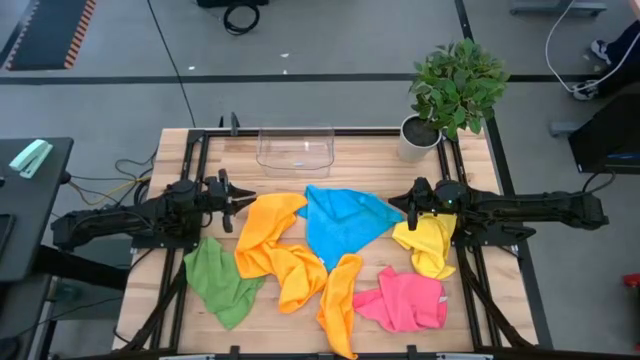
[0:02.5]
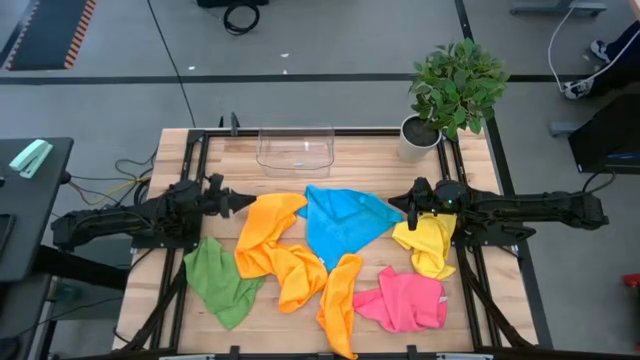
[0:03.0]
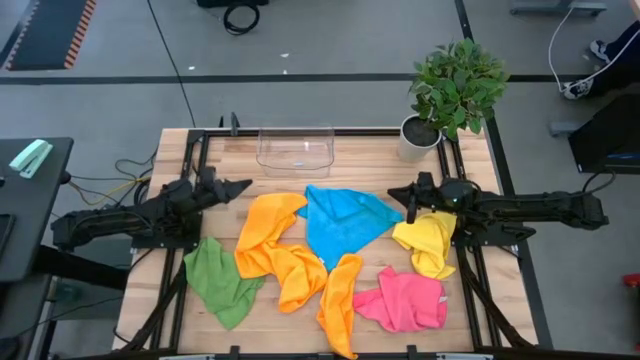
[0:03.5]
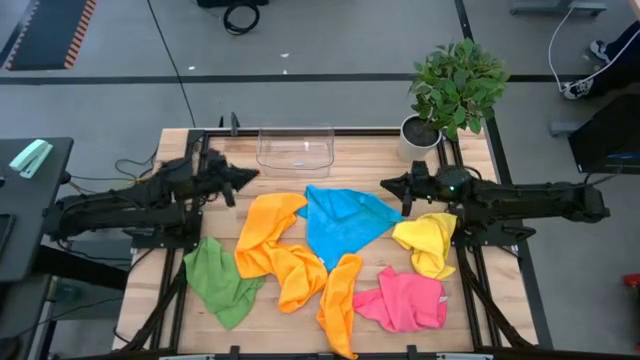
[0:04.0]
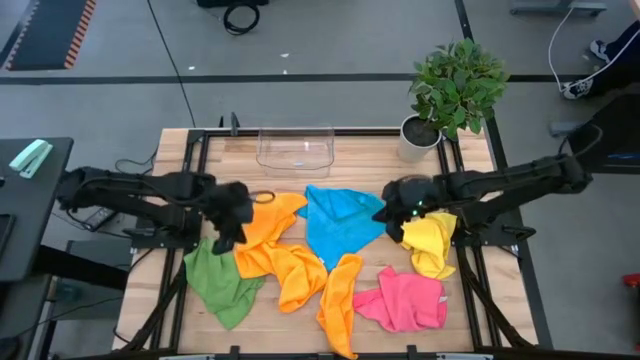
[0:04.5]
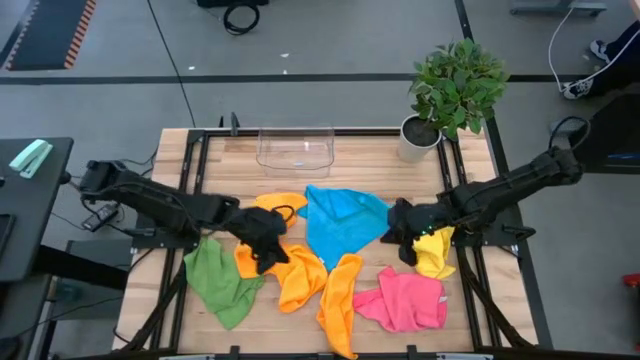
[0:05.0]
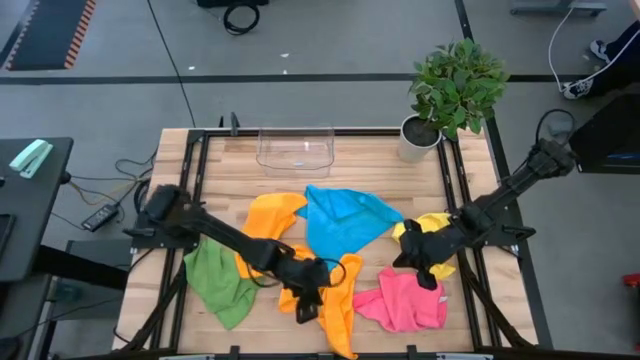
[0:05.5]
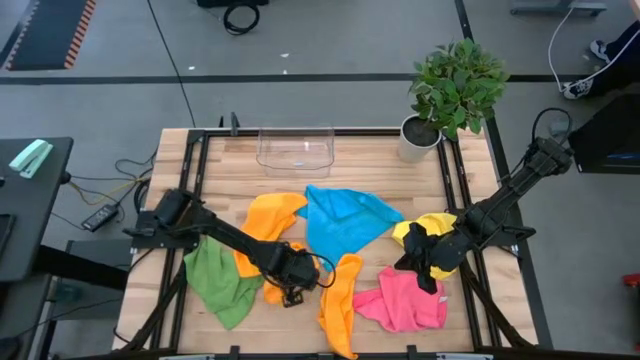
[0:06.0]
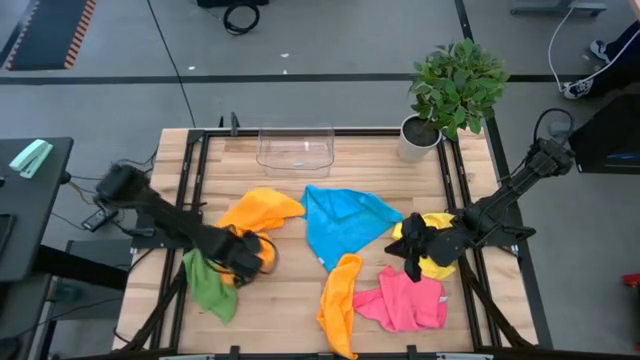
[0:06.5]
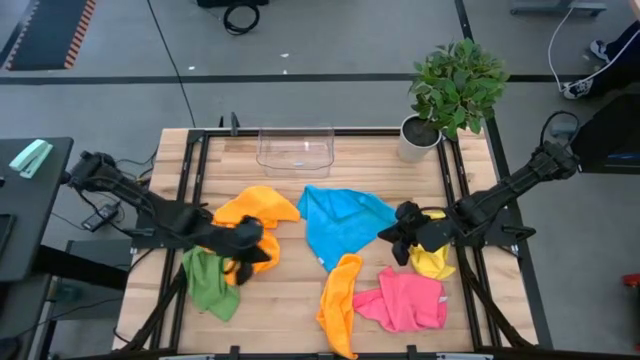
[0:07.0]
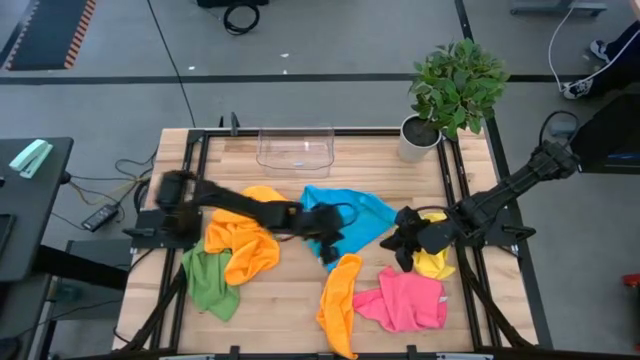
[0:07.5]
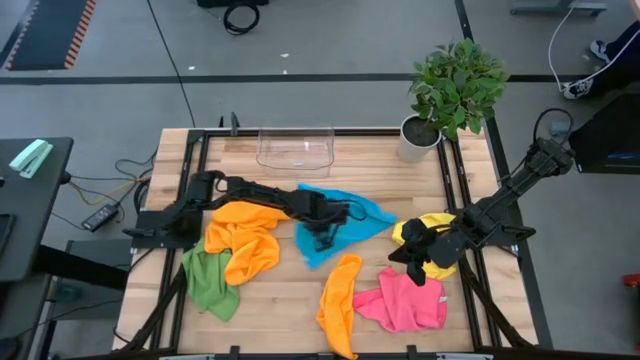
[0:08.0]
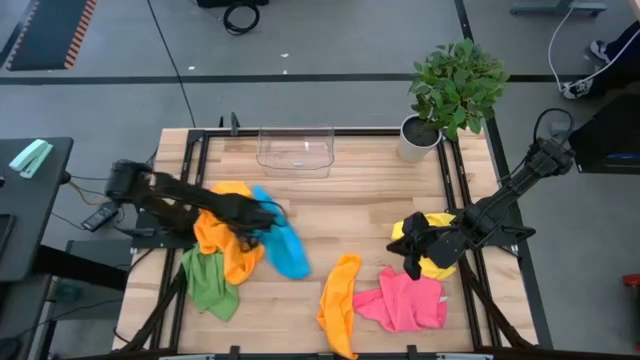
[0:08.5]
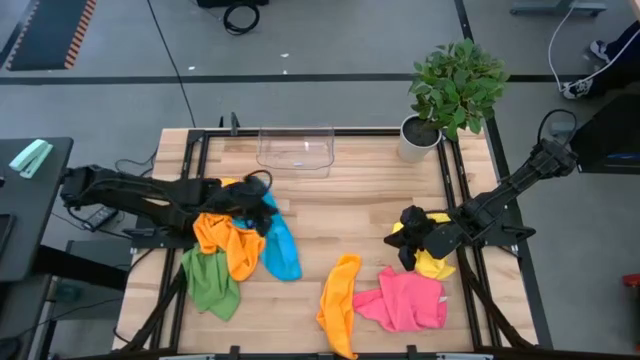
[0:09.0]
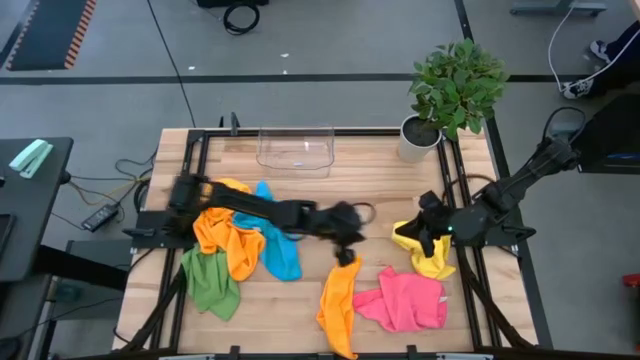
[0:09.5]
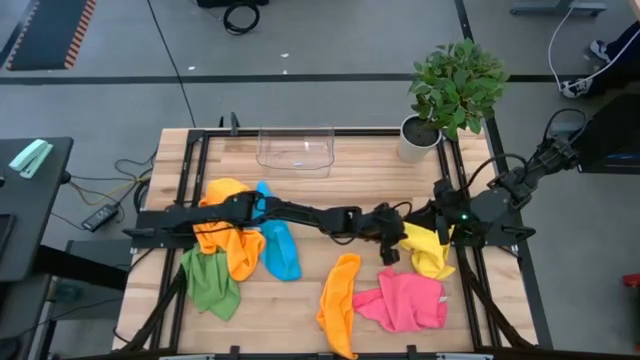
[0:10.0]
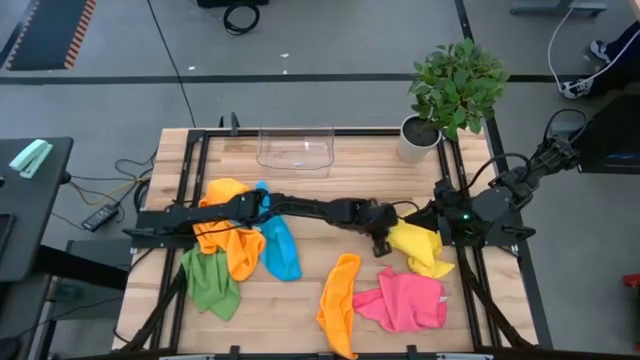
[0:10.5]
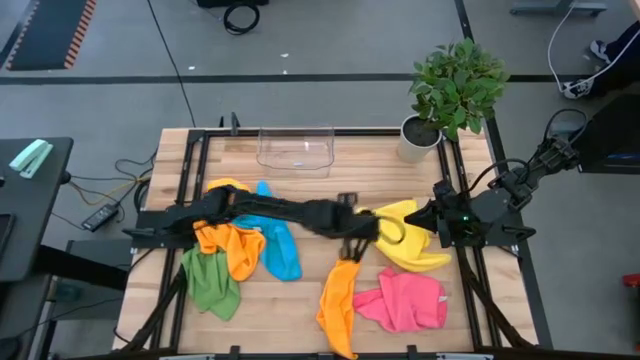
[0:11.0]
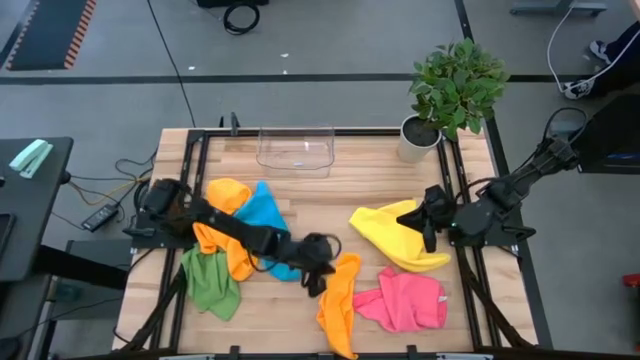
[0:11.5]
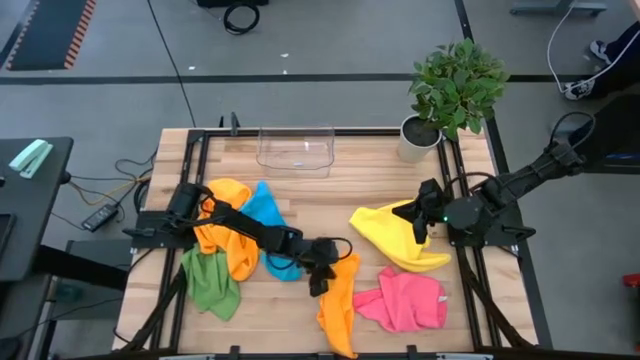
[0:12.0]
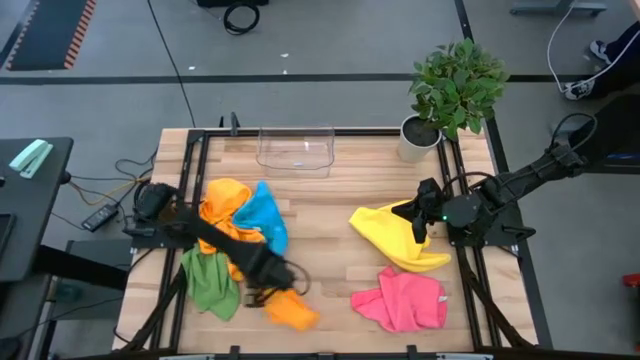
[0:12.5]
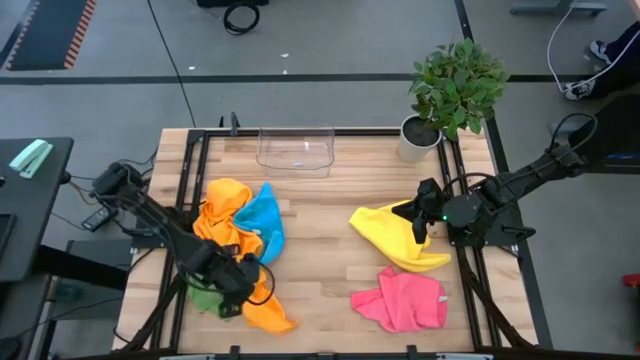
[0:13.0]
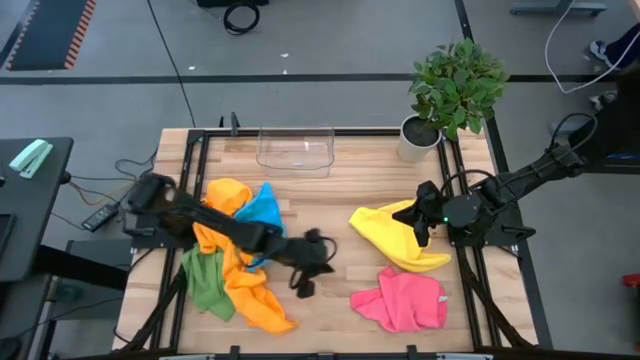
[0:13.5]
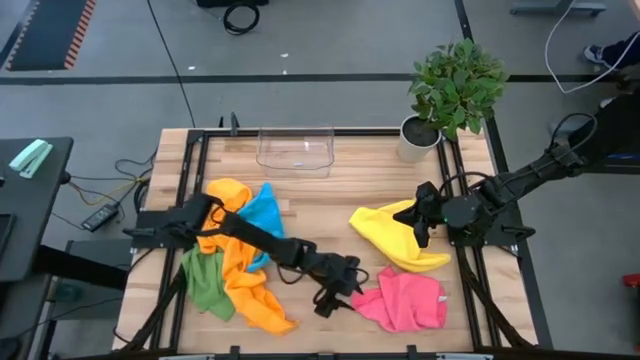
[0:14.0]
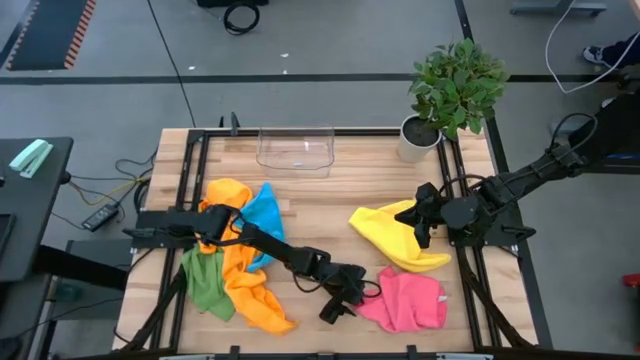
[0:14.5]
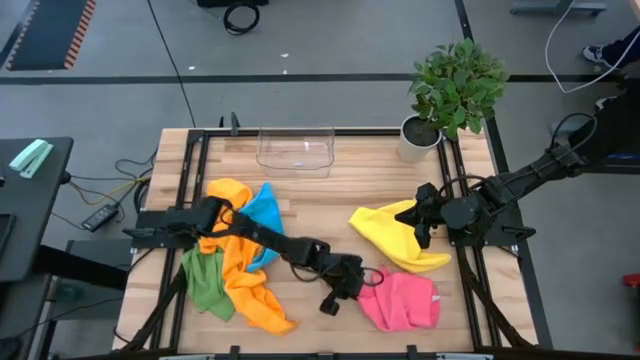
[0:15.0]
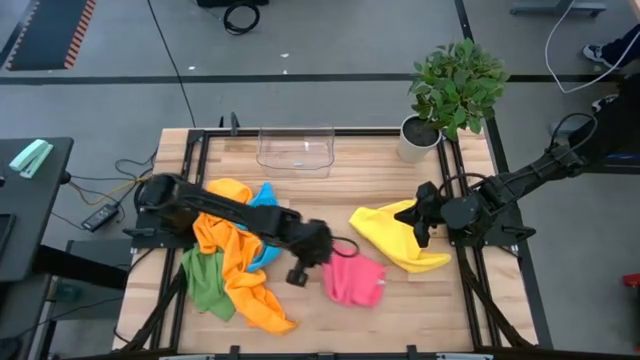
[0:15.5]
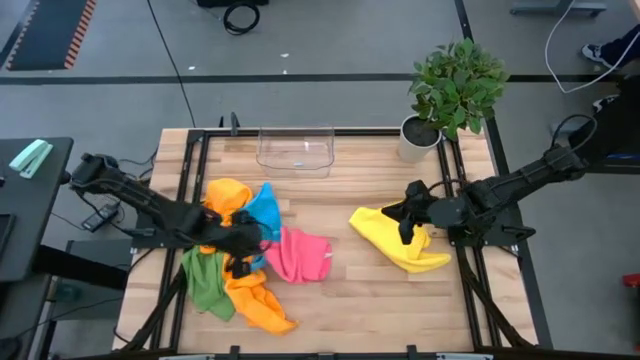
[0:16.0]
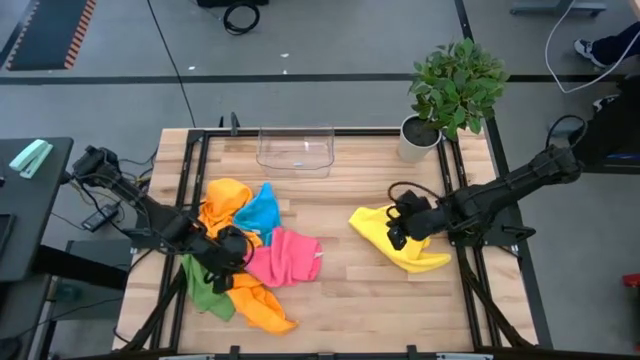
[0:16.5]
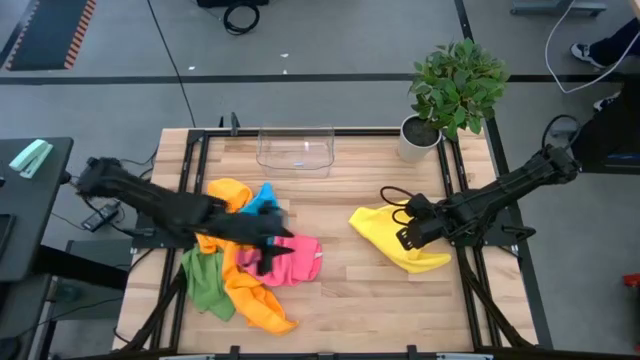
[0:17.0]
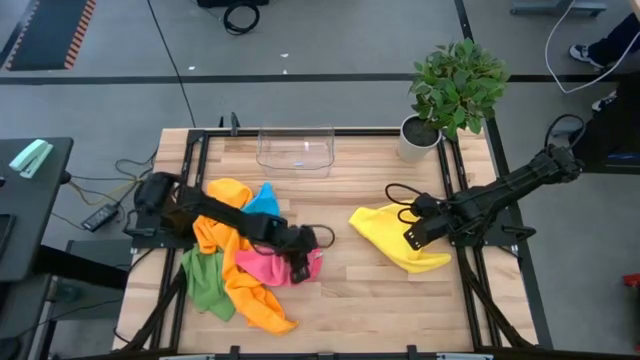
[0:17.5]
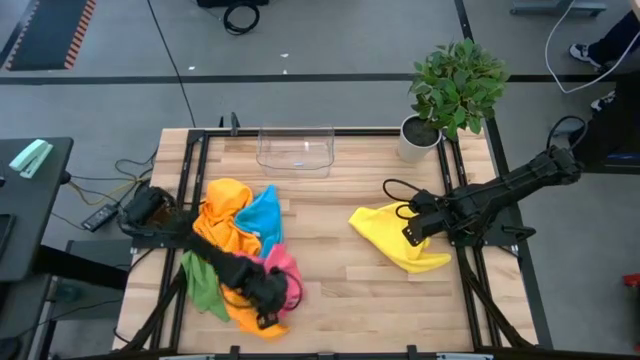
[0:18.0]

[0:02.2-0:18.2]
Task: Fold microfiber towels
Move the microfiber towels to the left of the table

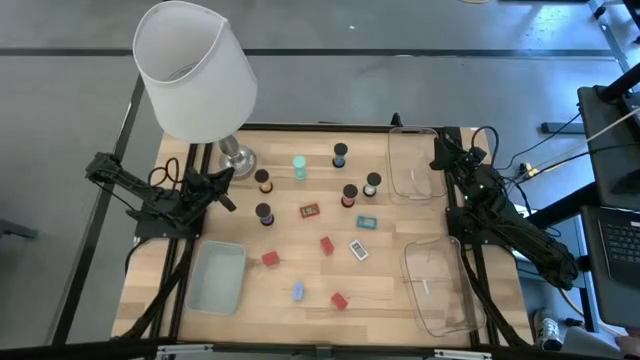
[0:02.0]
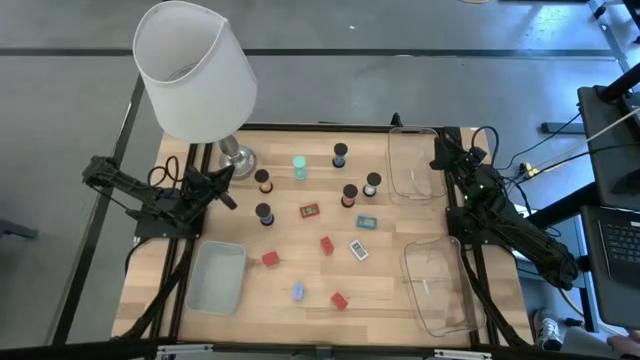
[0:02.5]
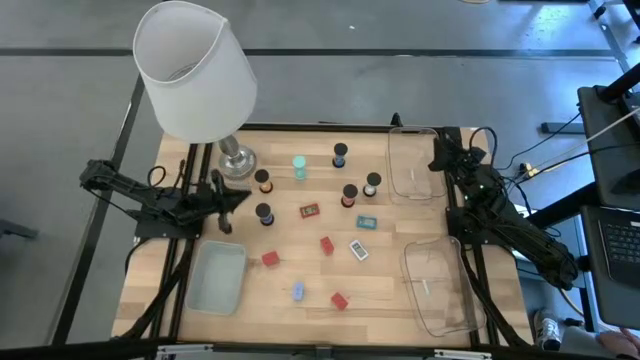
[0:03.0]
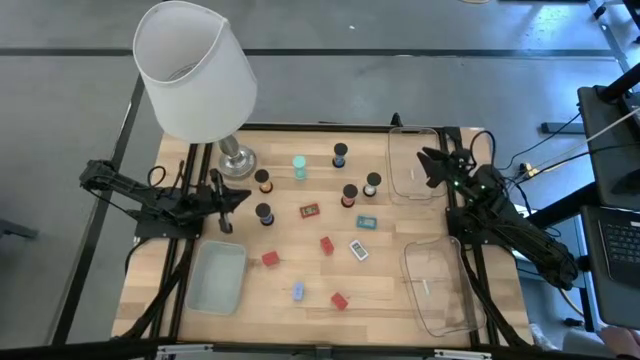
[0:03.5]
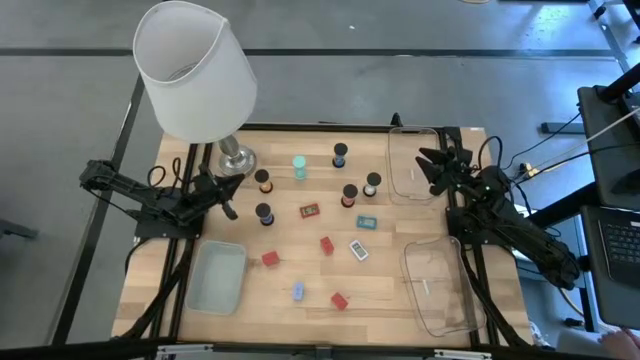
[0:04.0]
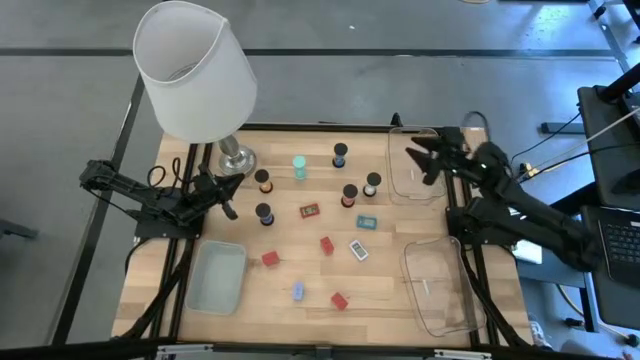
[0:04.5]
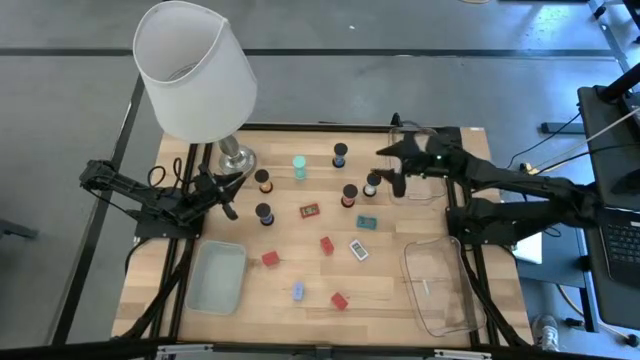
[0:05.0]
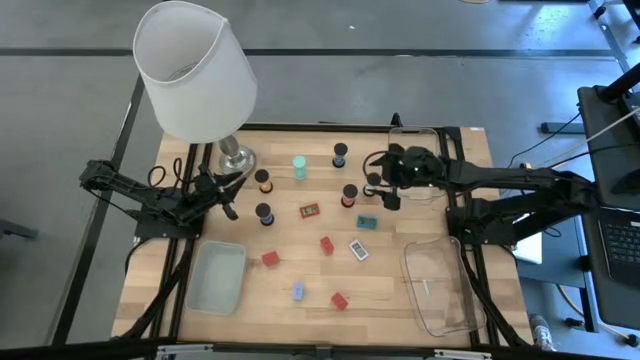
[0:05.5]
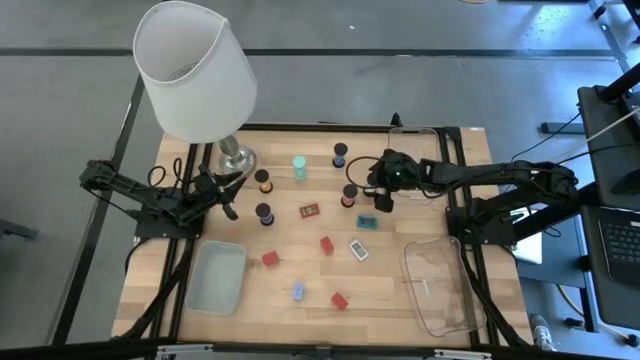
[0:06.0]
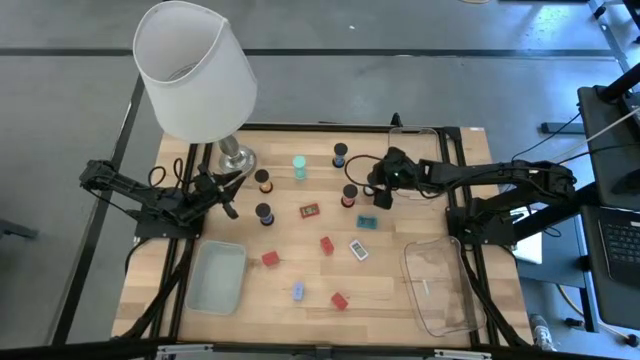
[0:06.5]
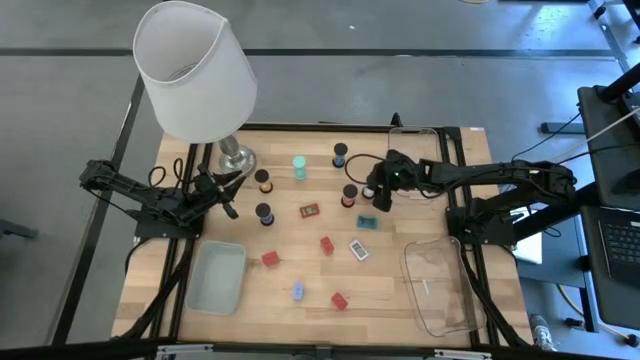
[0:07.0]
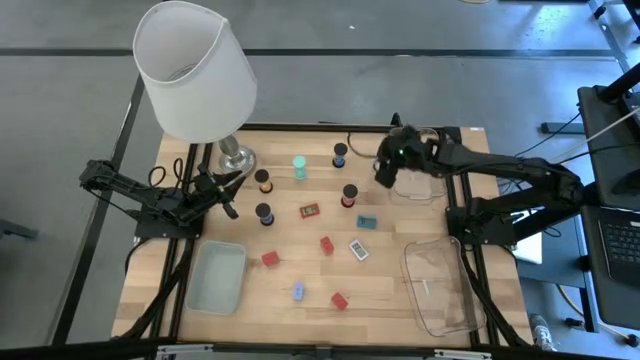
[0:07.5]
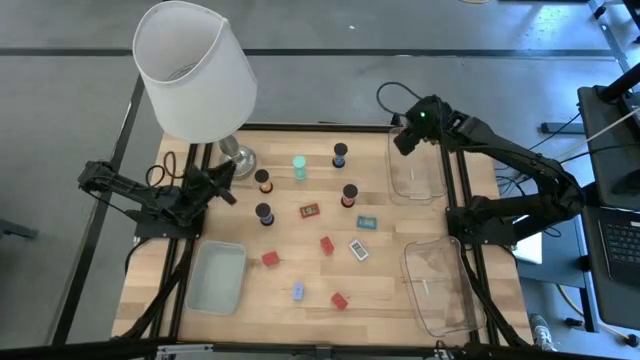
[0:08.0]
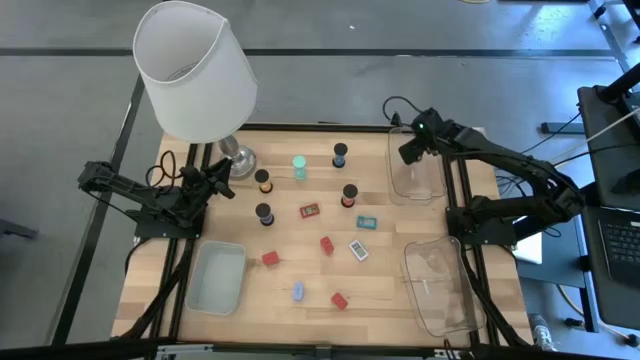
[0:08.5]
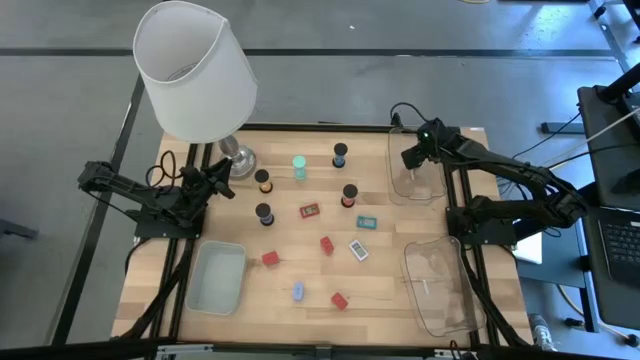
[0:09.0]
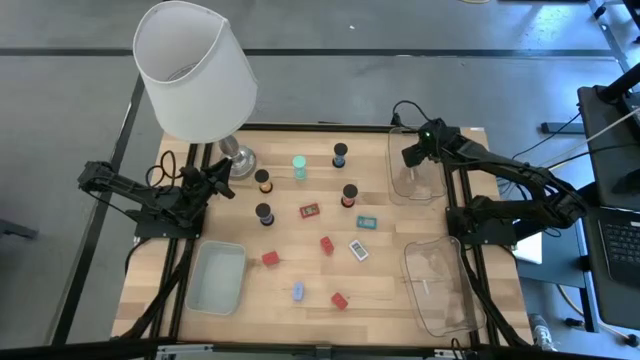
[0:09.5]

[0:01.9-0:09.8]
Task: Pick & Place Office items
Put the white sand timer into the top transparent bin
